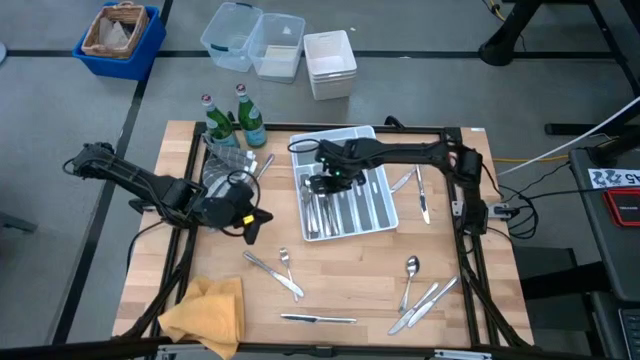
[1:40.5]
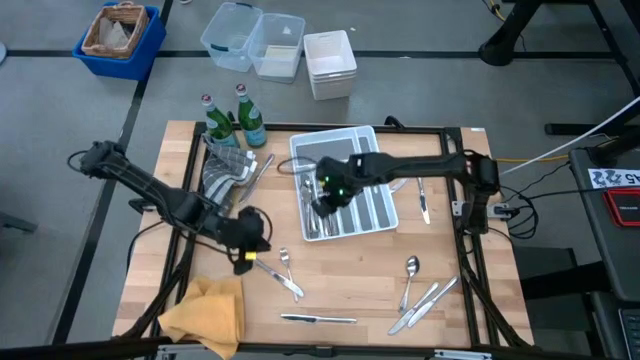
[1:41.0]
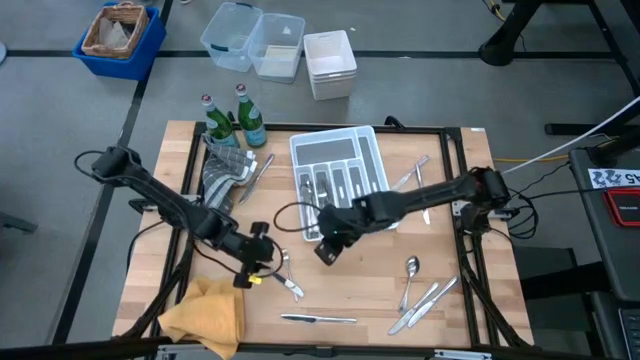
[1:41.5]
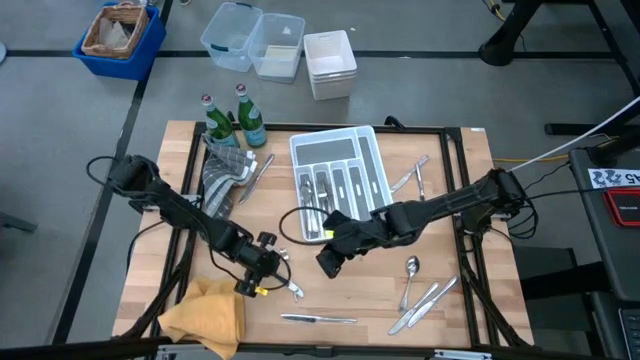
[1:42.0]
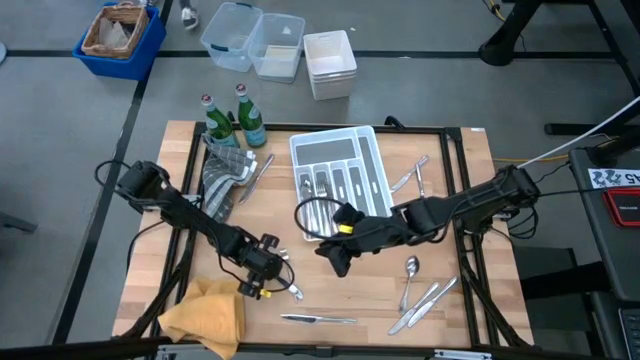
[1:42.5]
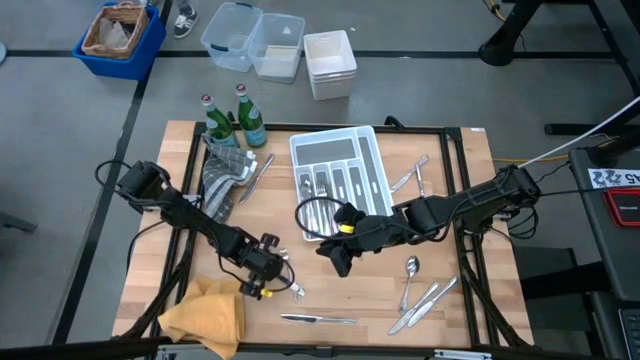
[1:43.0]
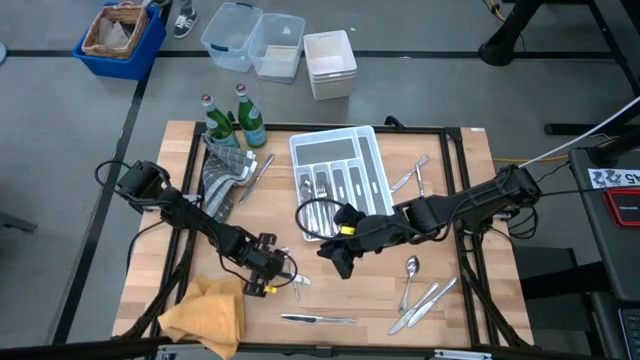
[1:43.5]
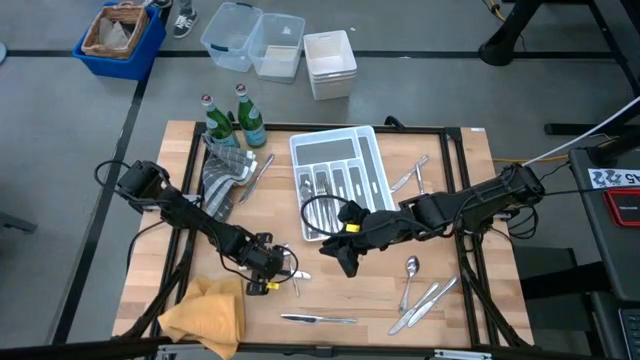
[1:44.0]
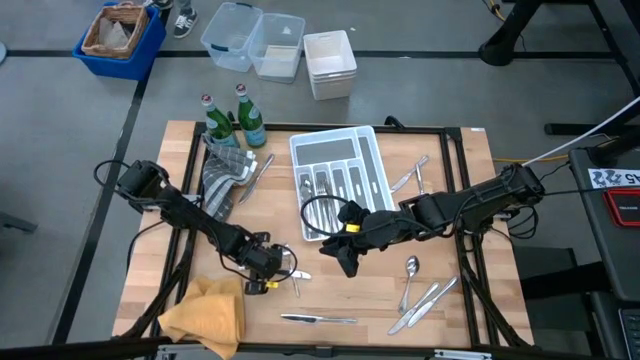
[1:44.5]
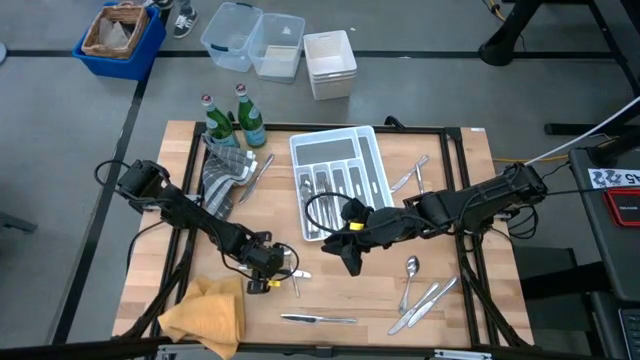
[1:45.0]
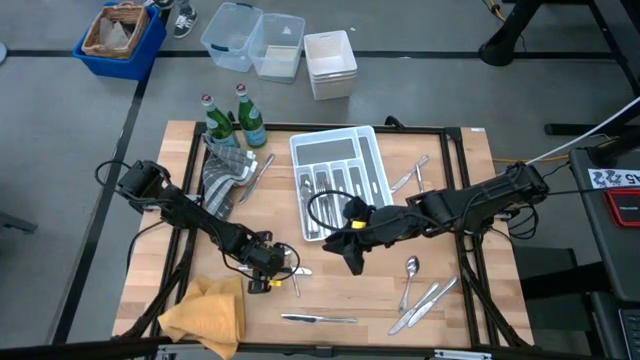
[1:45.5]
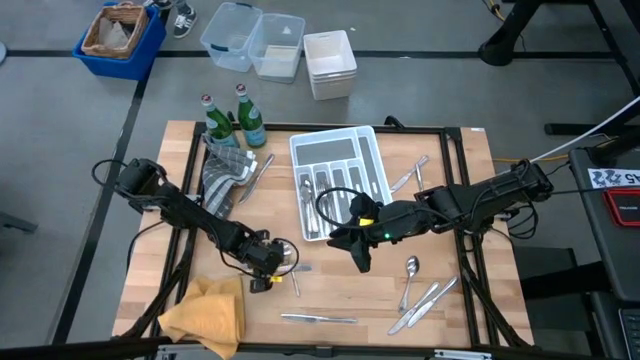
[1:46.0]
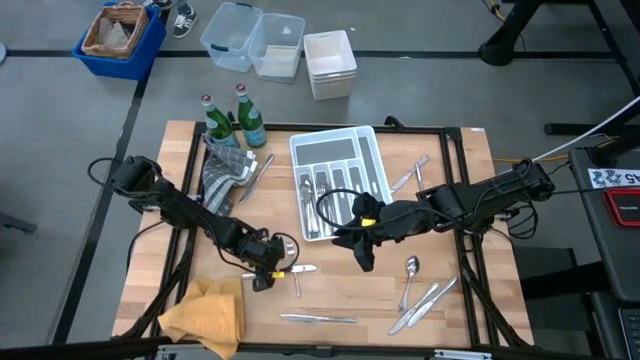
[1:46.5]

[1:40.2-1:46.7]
Task: Sort silverware
Put the silver table knife into the silverware tray

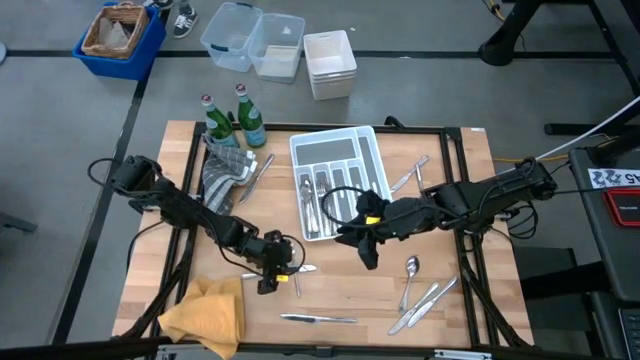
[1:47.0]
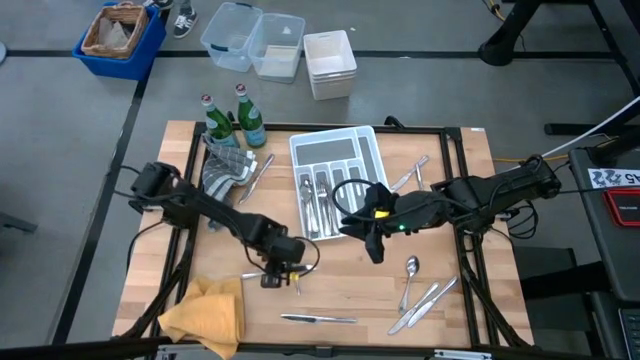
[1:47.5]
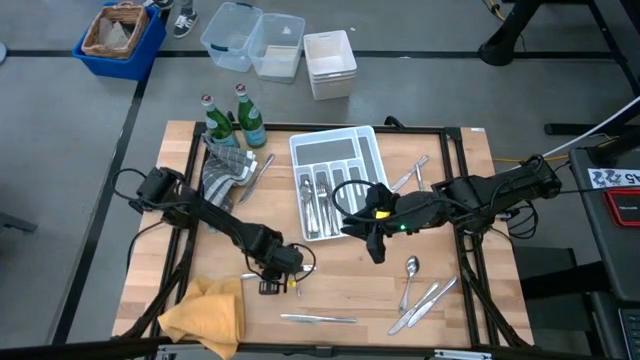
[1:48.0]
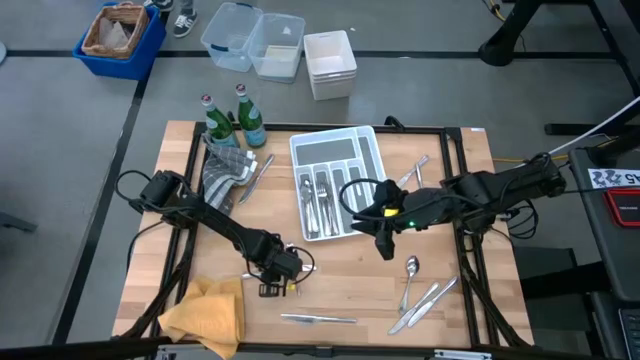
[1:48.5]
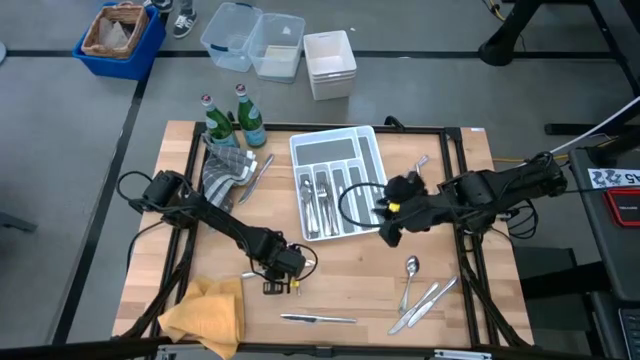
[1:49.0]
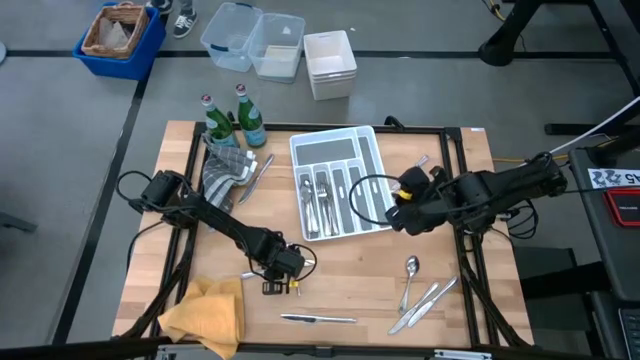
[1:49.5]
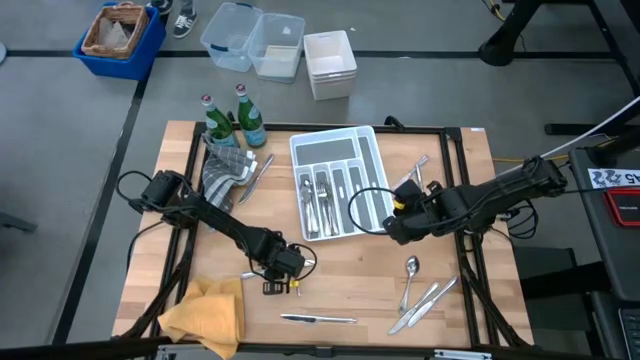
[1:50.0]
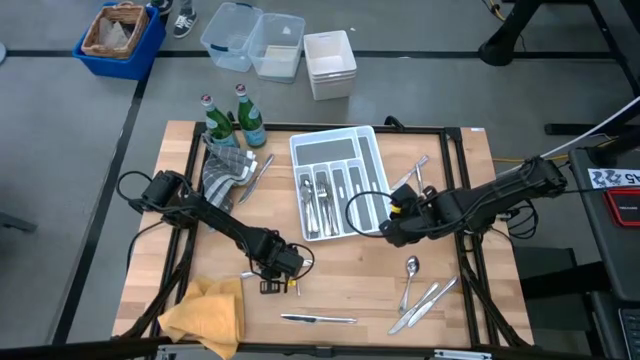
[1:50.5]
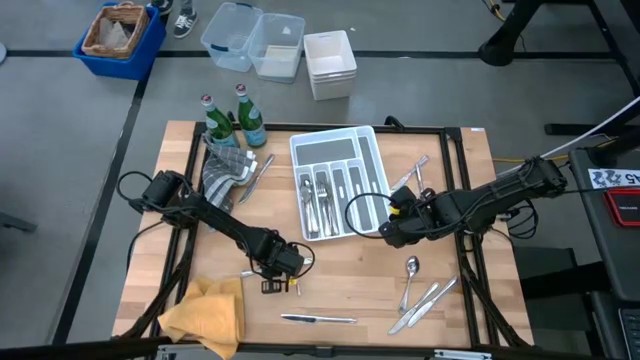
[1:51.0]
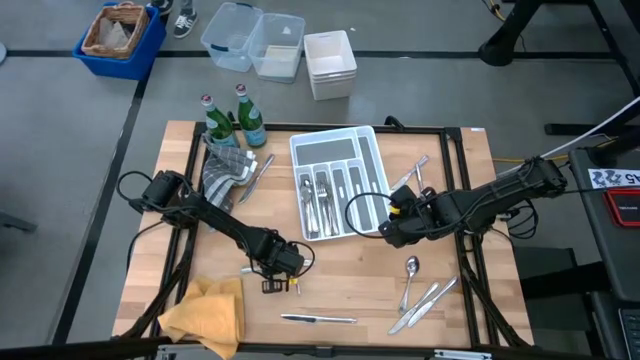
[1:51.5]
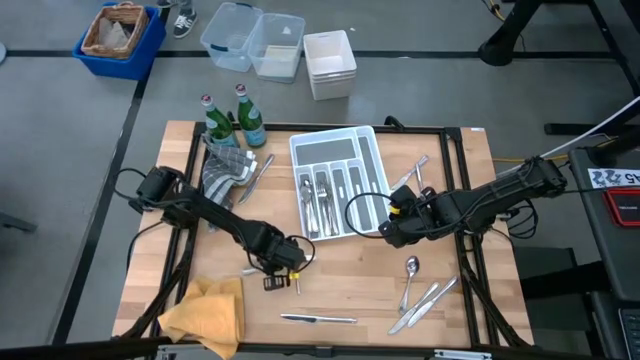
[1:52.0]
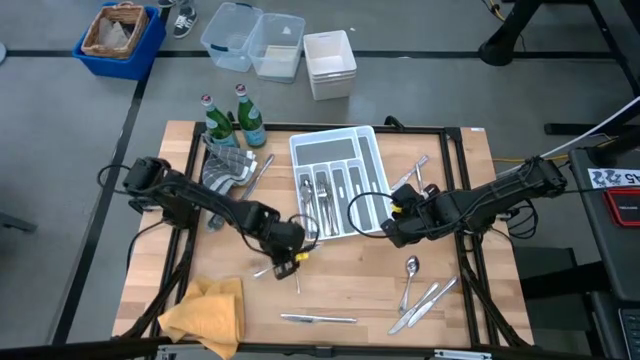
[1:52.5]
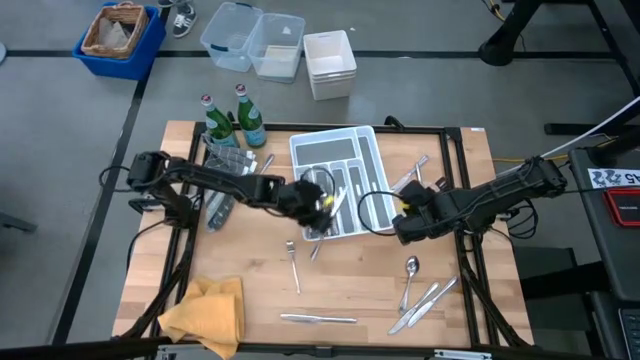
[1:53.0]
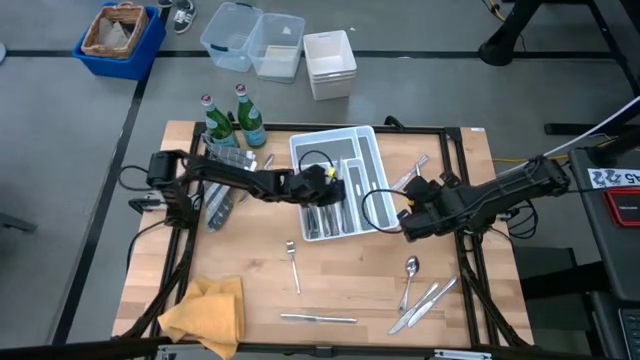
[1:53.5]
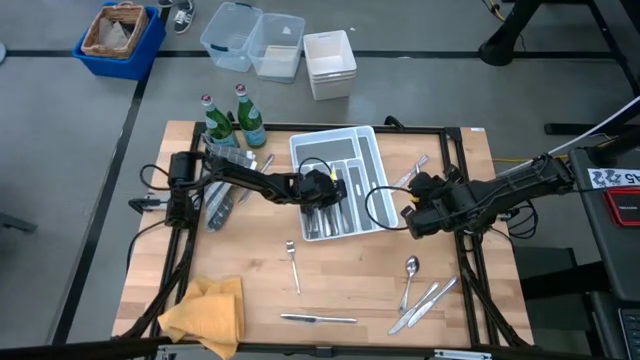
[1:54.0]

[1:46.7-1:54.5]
Put the silver table knife into the silverware tray

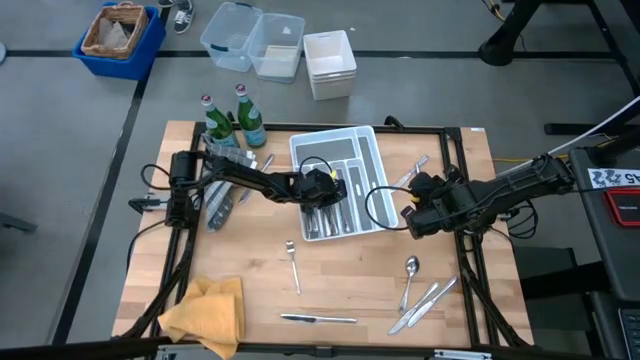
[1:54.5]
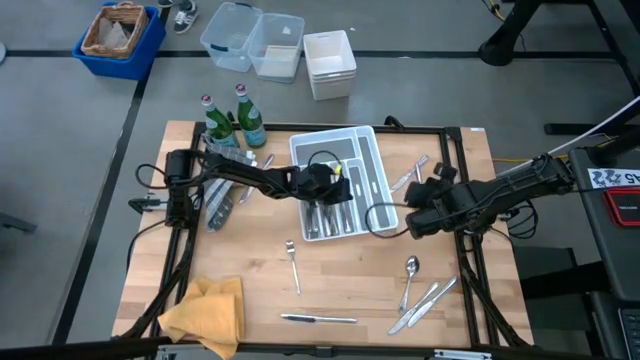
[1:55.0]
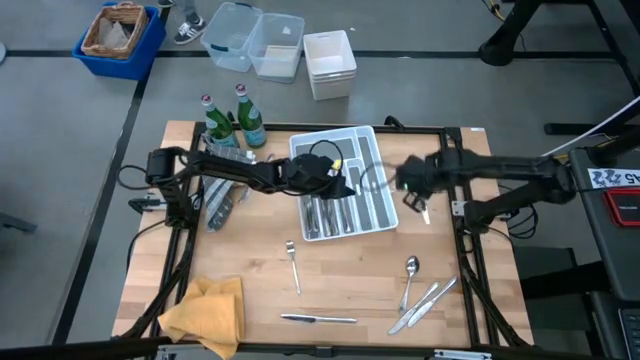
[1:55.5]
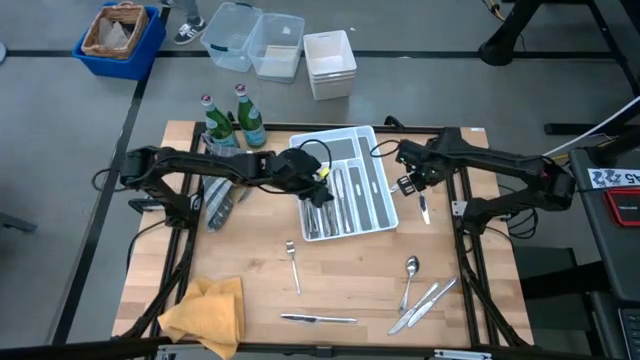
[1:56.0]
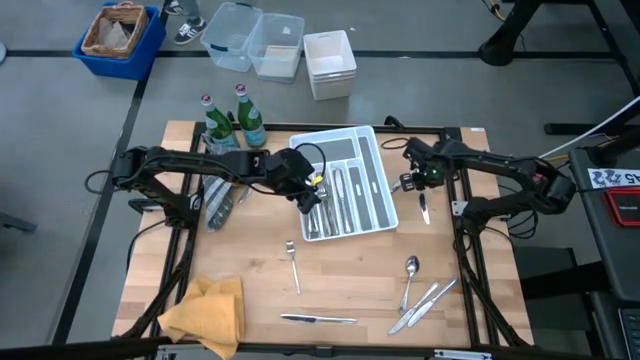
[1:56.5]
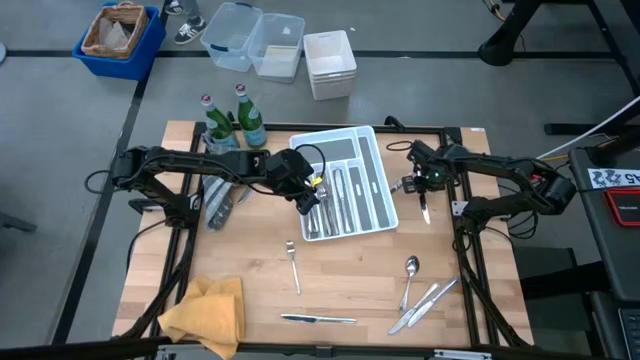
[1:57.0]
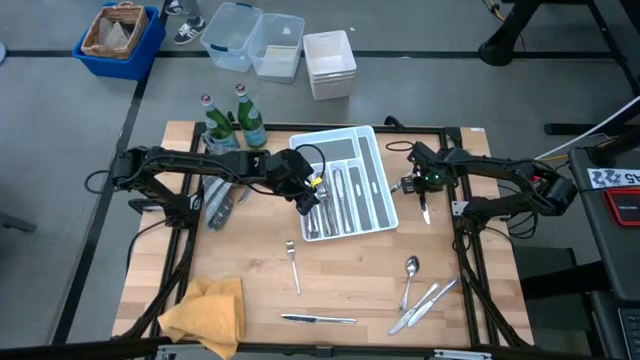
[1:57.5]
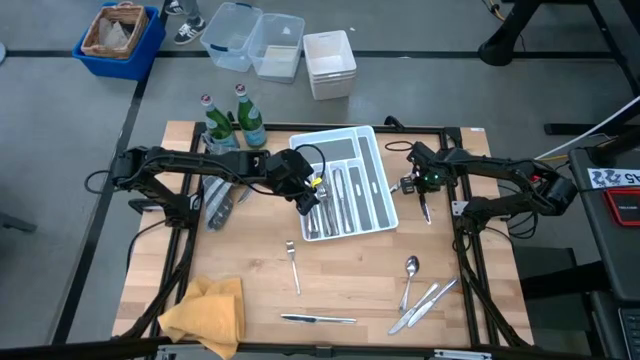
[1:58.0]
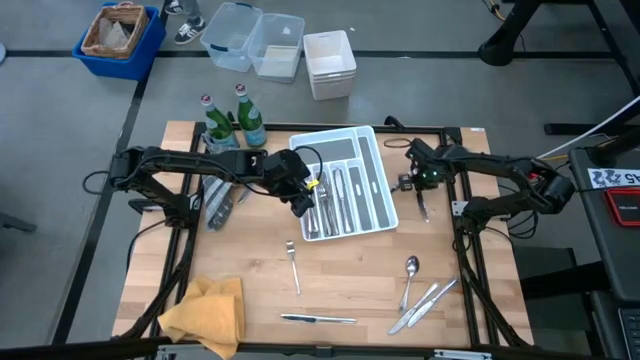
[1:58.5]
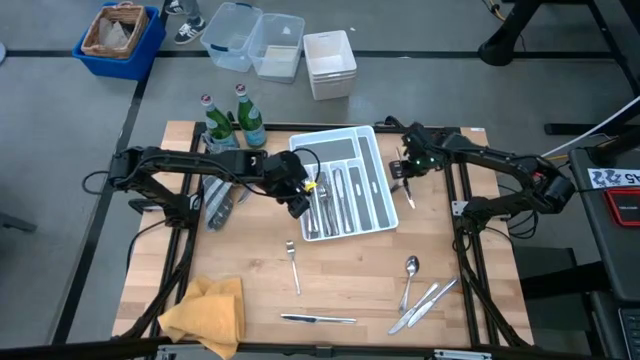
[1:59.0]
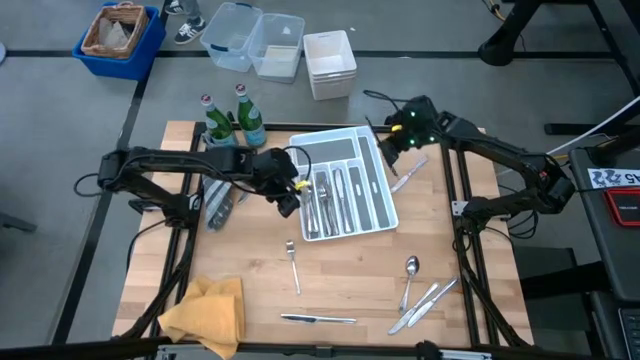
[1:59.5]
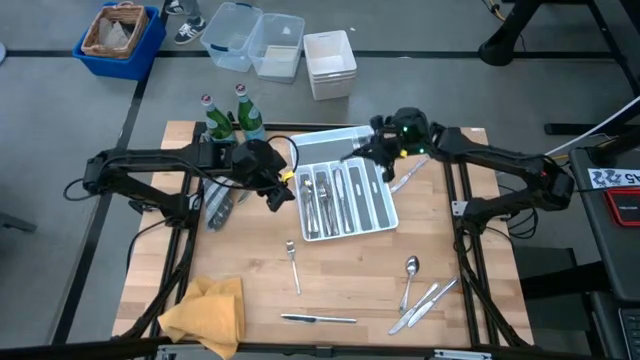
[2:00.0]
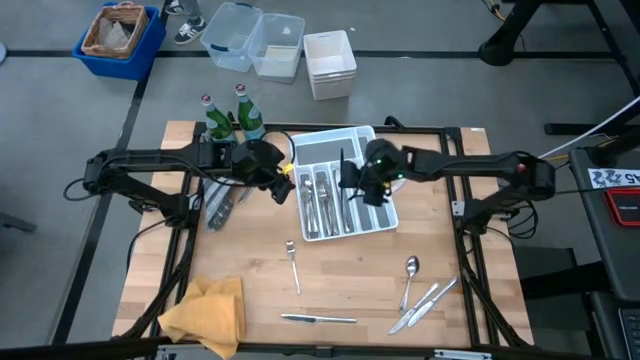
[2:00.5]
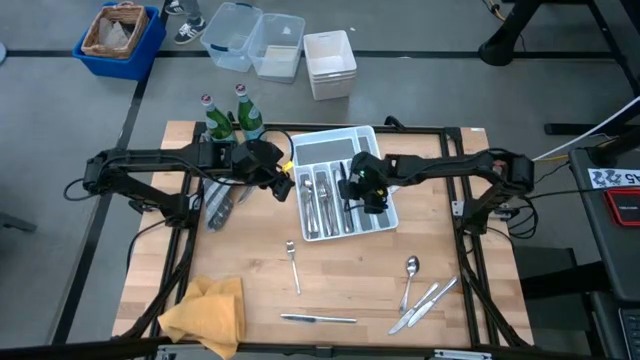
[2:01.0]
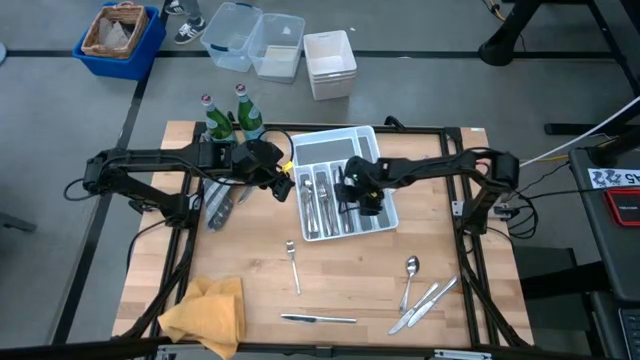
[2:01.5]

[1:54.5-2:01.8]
Put the silver table knife into the silverware tray

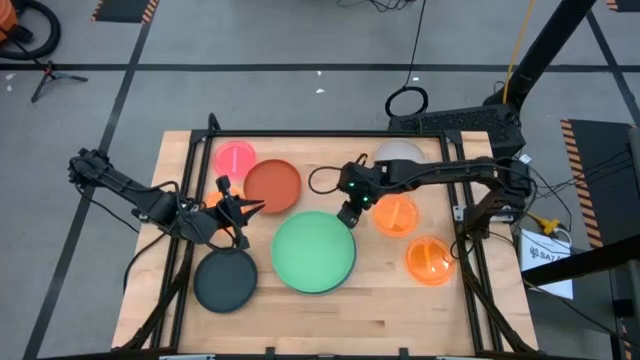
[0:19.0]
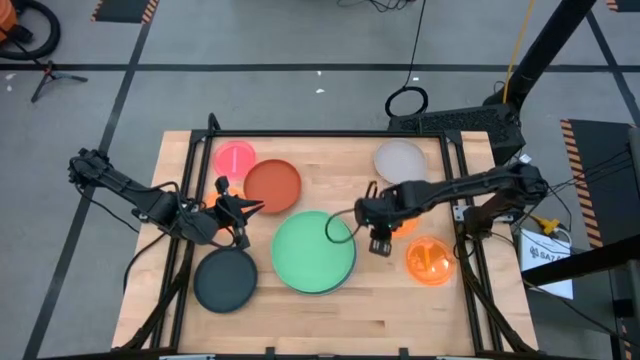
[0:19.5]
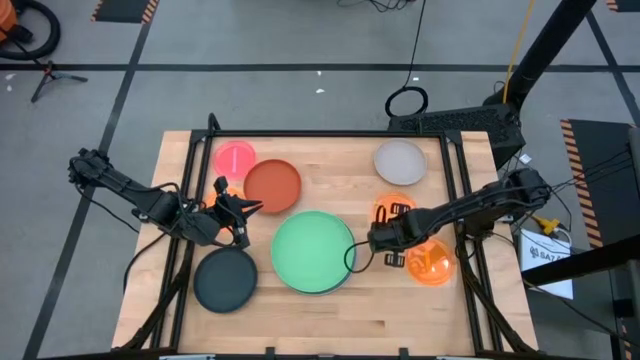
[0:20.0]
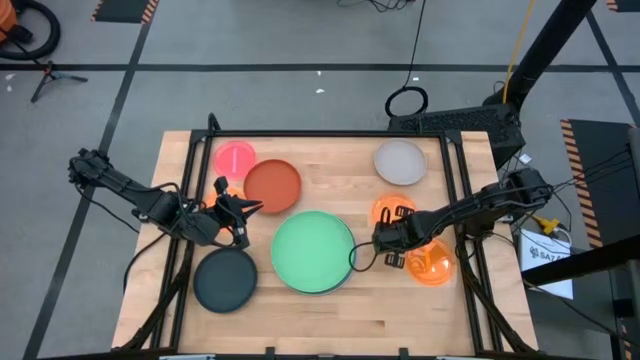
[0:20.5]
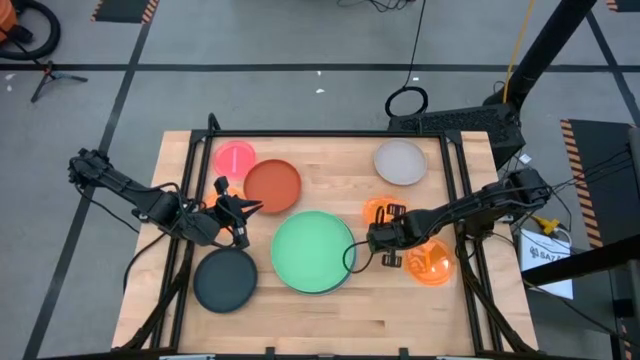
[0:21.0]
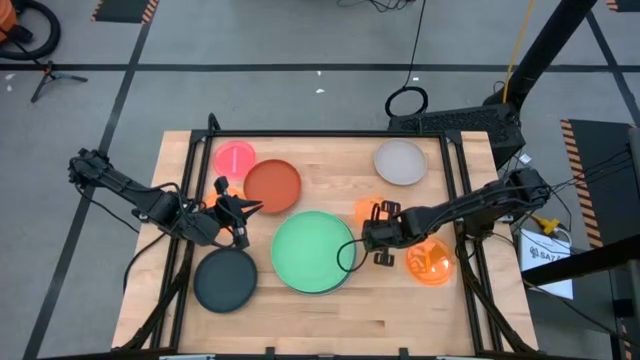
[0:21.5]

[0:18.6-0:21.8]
Task: Stack plastic plates
Stack the top right orange plate on the green plate
